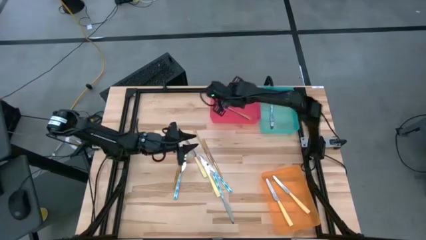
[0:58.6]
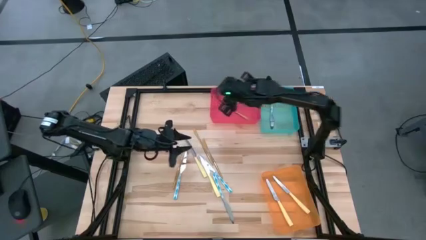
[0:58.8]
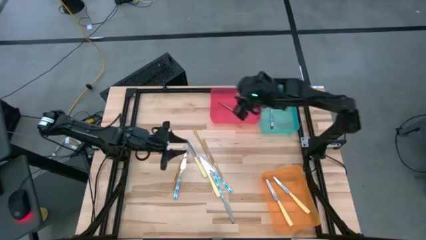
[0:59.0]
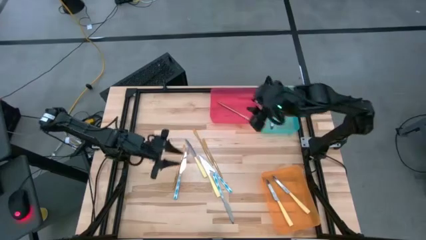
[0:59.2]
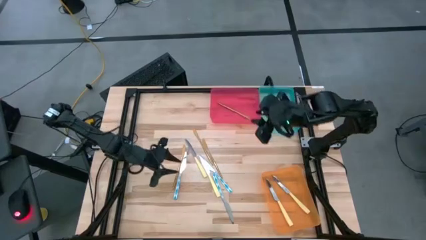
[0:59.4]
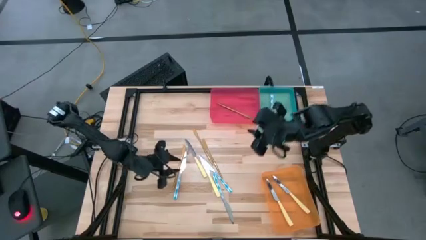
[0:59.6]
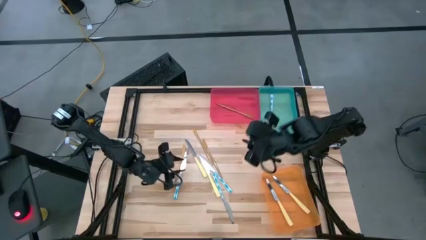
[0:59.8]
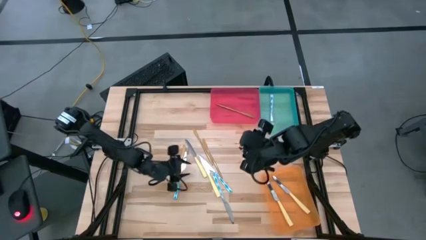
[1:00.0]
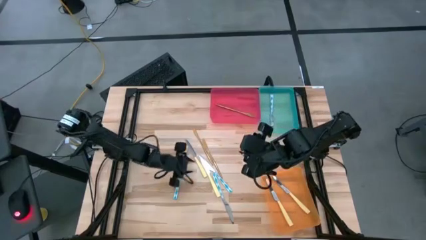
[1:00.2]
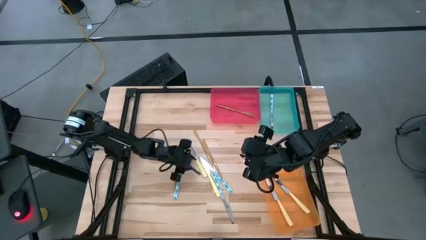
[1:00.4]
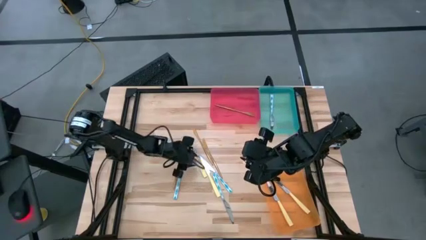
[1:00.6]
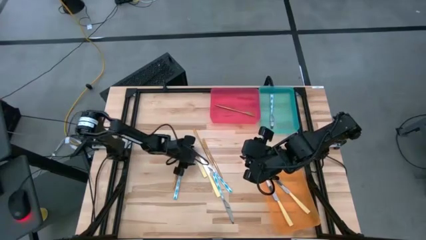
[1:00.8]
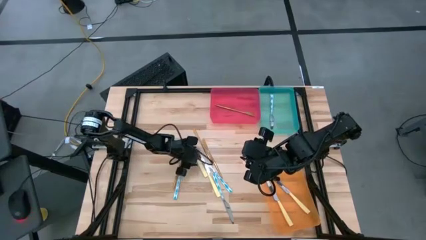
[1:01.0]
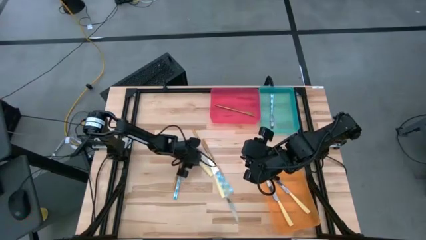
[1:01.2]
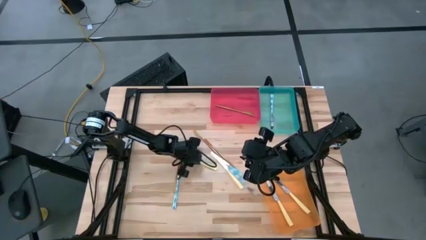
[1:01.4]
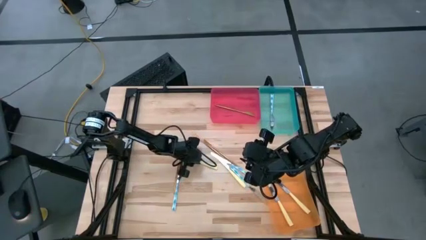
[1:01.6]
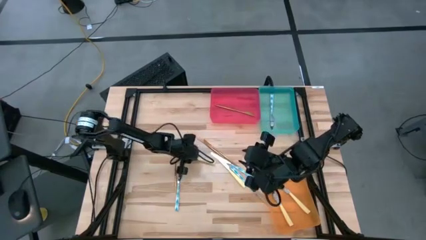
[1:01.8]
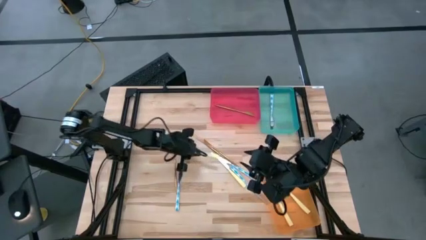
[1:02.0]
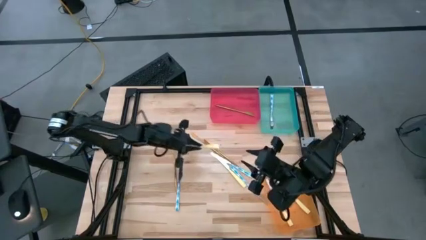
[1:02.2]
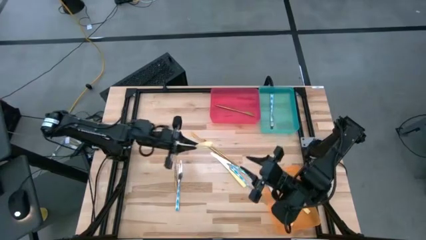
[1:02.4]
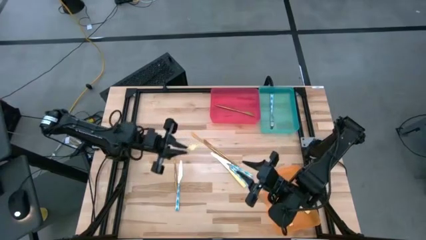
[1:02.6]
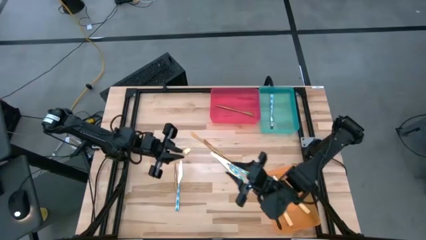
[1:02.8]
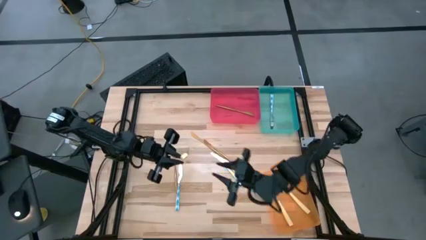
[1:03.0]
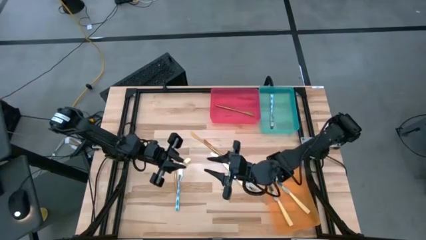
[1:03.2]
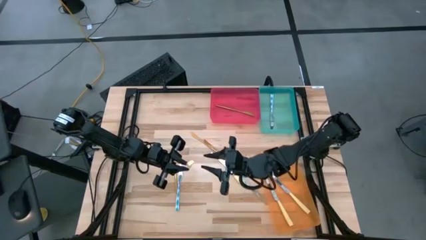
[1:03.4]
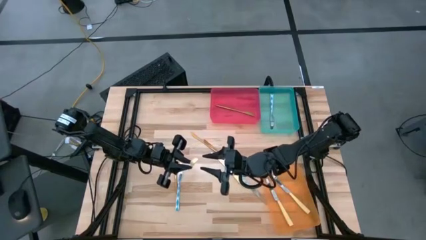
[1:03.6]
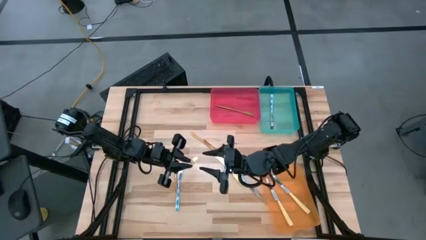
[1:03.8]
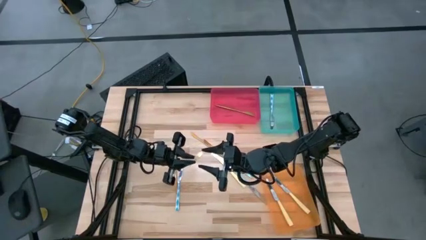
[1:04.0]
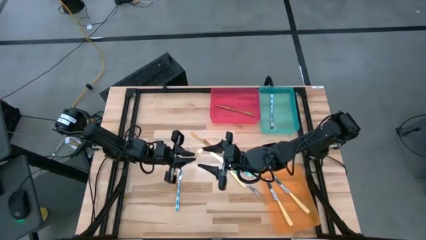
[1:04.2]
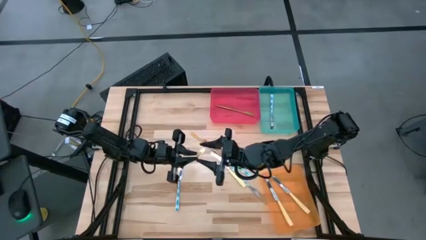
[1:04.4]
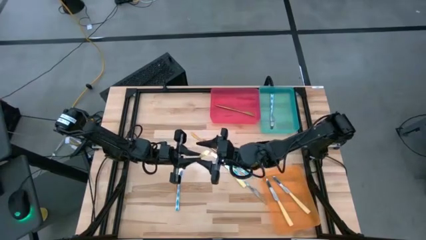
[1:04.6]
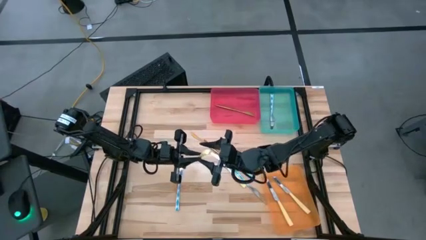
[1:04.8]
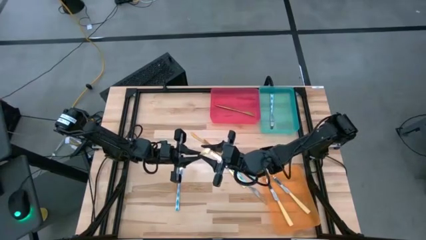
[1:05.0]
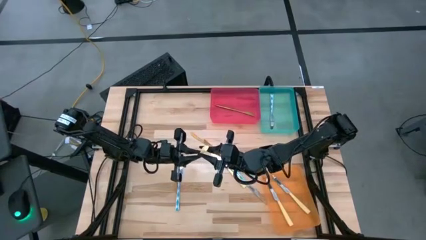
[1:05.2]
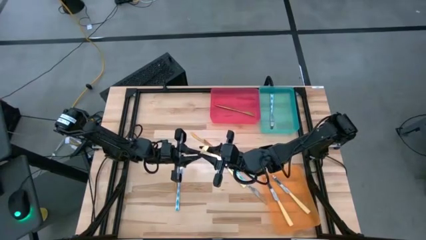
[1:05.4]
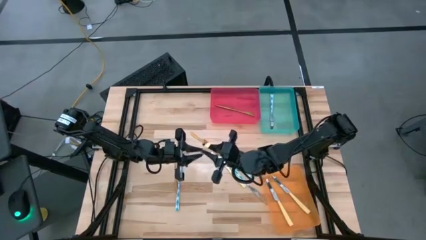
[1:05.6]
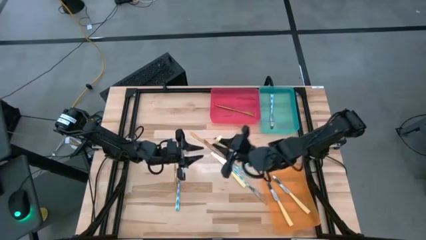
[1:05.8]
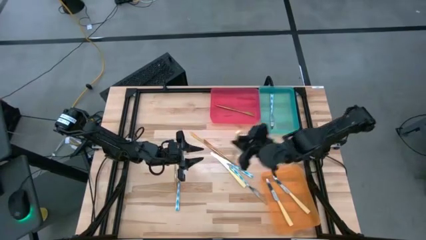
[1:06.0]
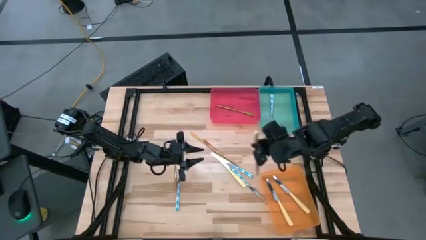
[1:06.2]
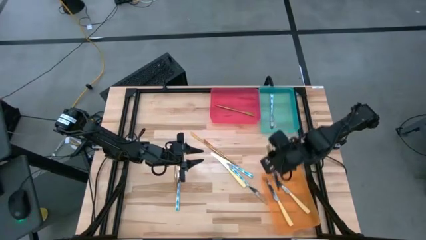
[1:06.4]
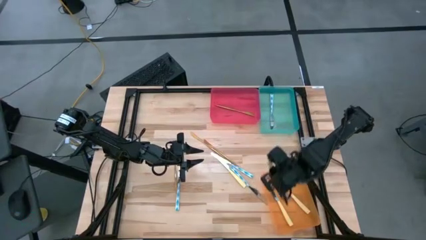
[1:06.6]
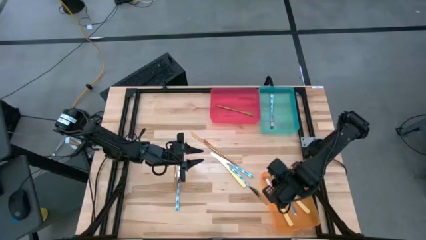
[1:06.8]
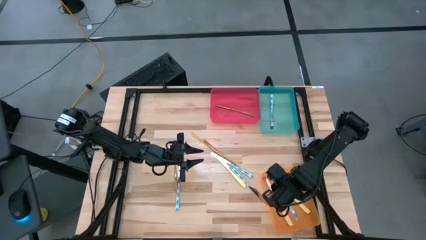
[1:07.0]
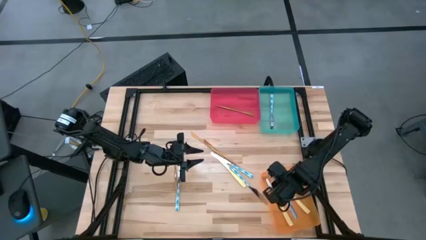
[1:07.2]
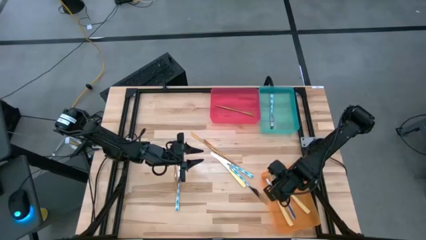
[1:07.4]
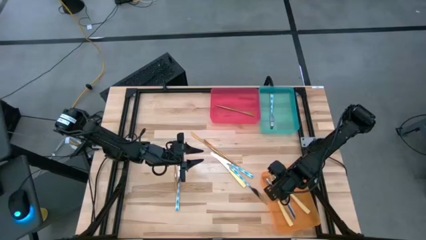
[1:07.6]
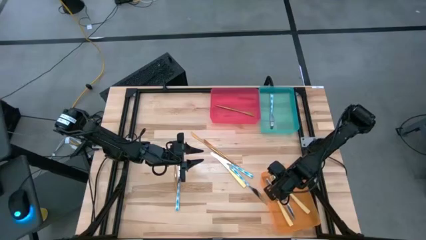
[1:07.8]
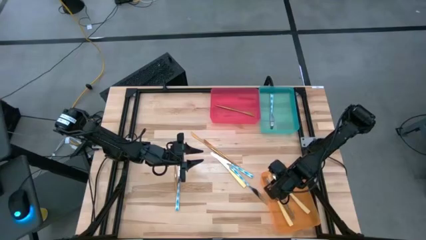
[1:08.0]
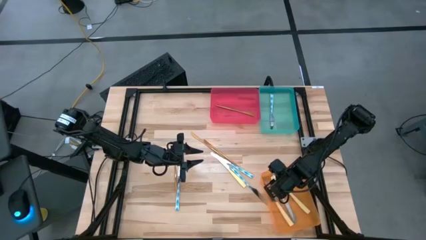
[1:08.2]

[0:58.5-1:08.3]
Task: Sort silverware by color (type)
Put the yellow knife into the orange bin

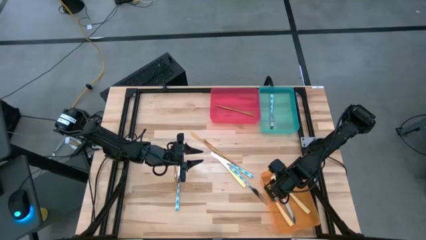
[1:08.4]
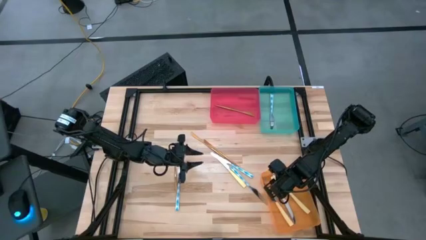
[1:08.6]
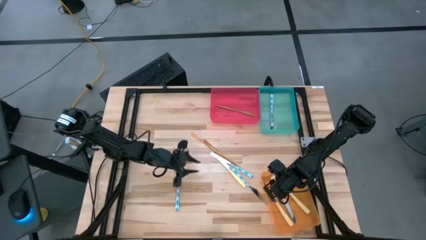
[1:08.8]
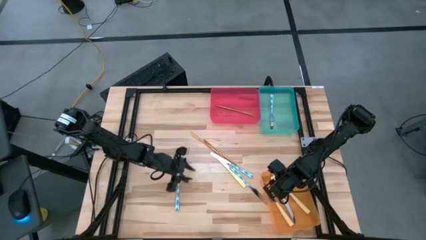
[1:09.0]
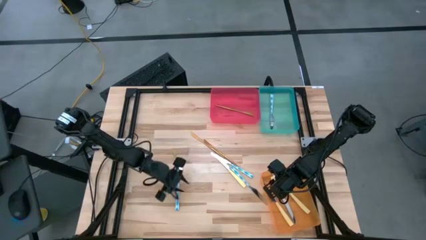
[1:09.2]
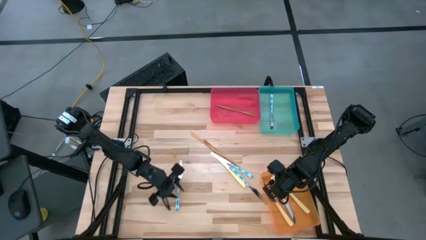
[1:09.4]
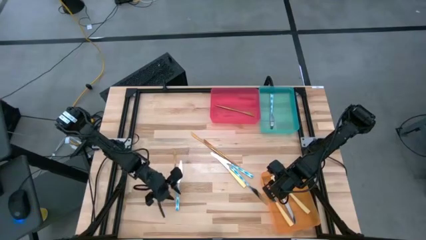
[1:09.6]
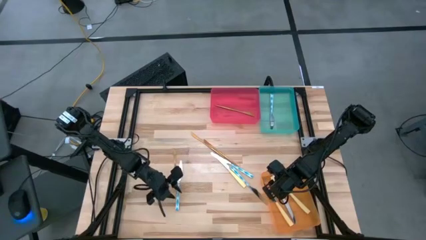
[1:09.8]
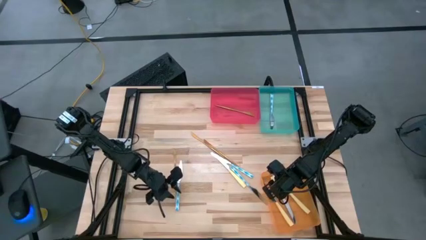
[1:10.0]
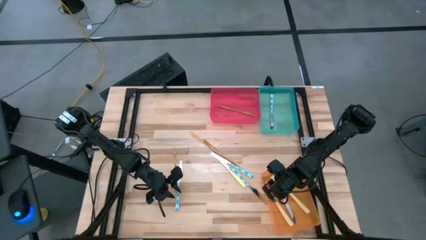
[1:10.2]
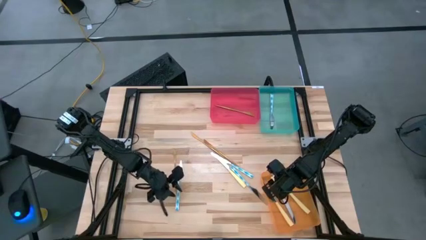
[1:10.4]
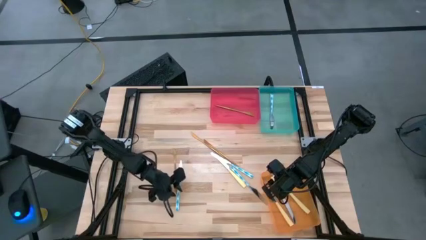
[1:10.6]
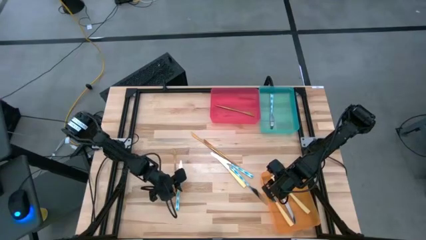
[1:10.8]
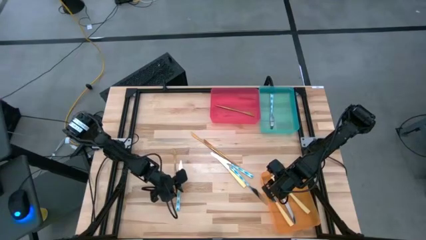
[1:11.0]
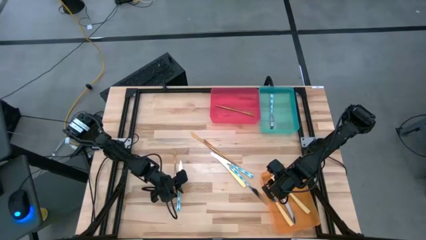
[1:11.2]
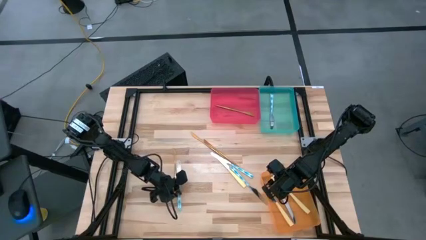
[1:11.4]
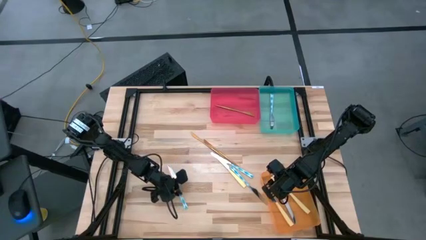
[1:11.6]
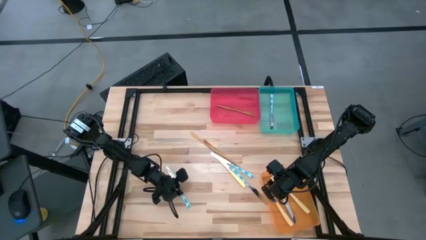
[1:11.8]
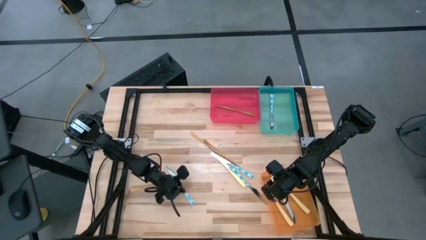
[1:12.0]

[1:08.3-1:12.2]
Put the blue knife into the blue bin
